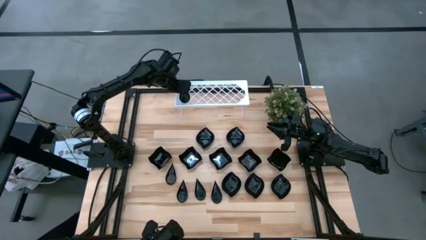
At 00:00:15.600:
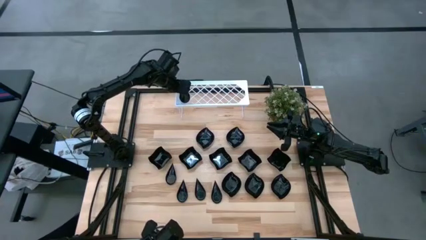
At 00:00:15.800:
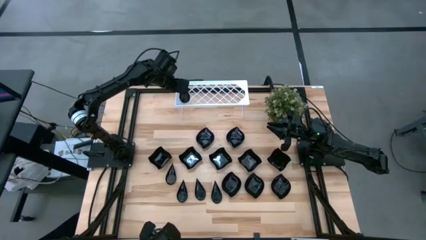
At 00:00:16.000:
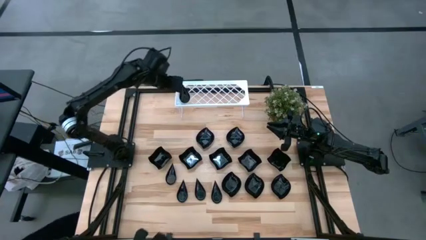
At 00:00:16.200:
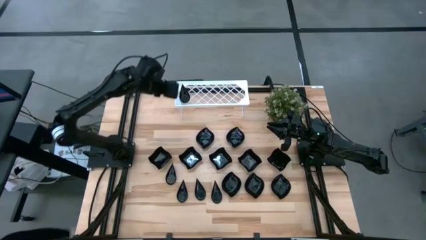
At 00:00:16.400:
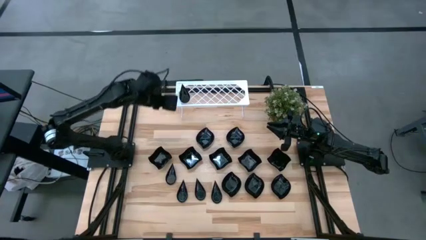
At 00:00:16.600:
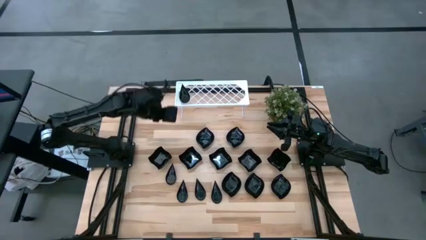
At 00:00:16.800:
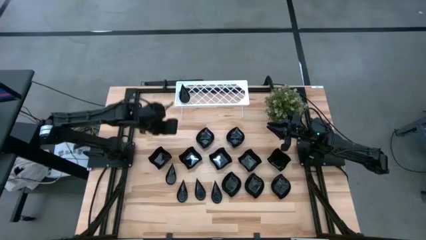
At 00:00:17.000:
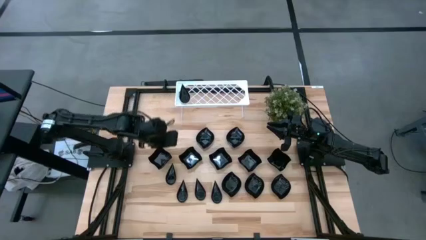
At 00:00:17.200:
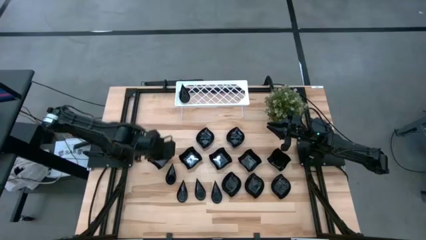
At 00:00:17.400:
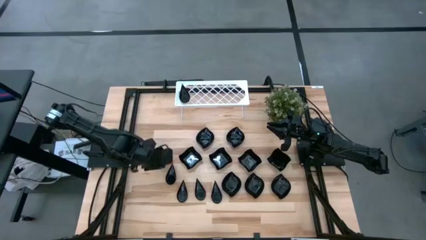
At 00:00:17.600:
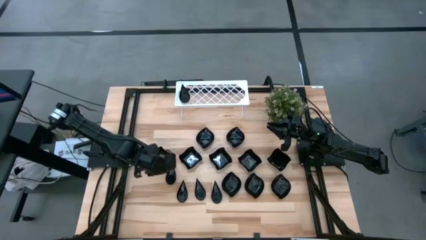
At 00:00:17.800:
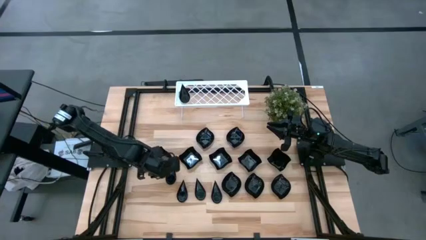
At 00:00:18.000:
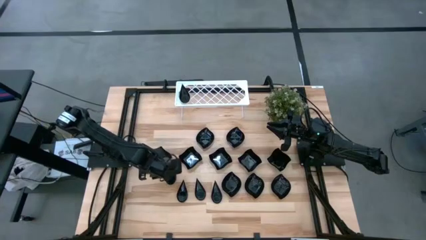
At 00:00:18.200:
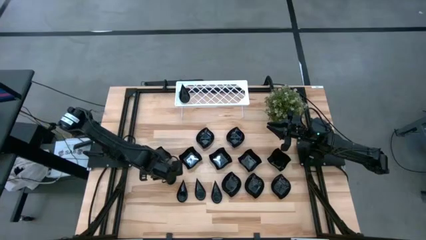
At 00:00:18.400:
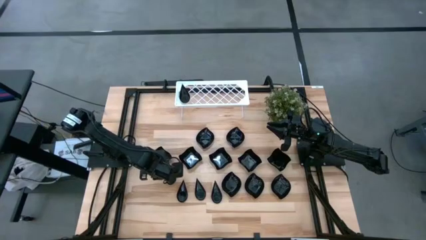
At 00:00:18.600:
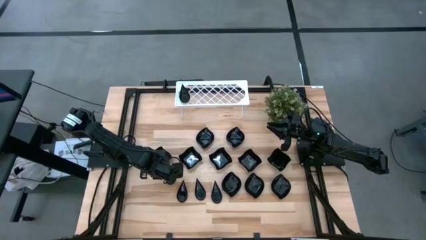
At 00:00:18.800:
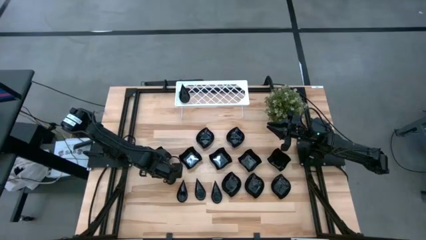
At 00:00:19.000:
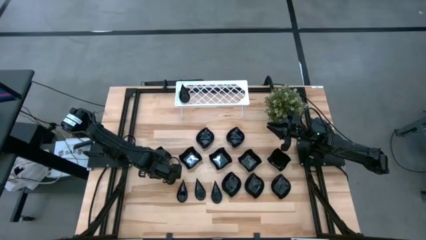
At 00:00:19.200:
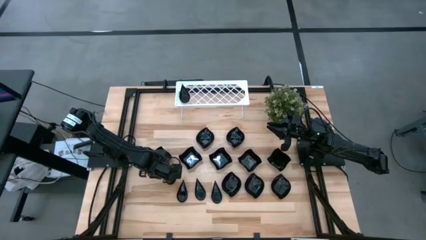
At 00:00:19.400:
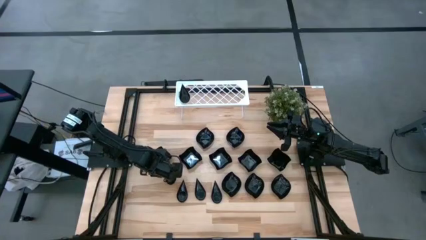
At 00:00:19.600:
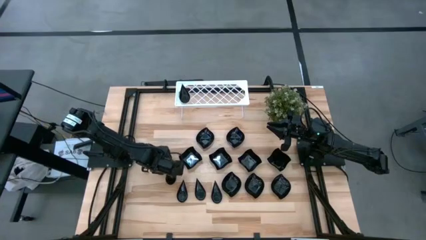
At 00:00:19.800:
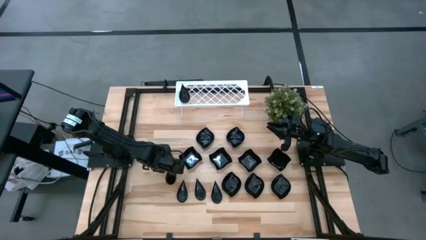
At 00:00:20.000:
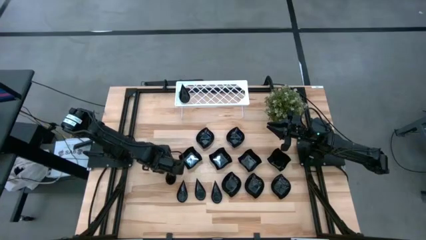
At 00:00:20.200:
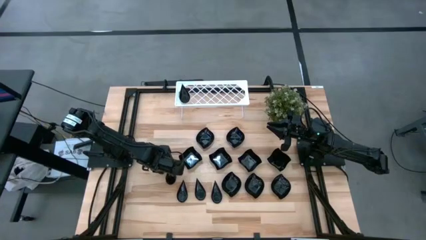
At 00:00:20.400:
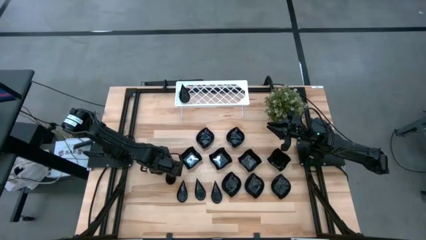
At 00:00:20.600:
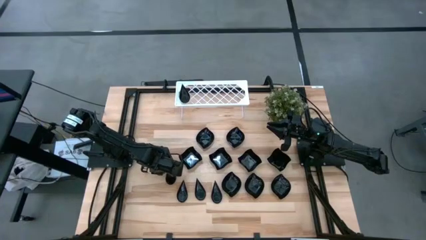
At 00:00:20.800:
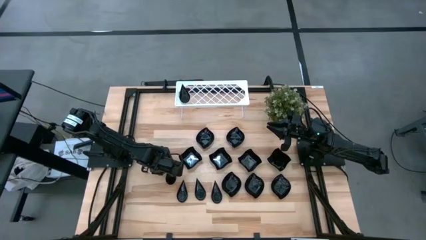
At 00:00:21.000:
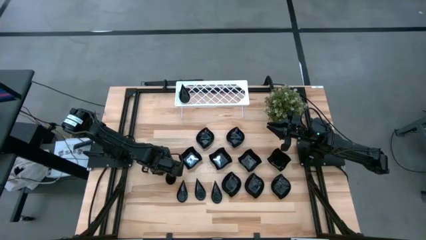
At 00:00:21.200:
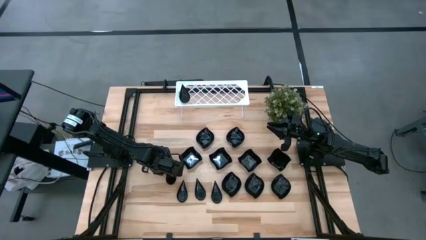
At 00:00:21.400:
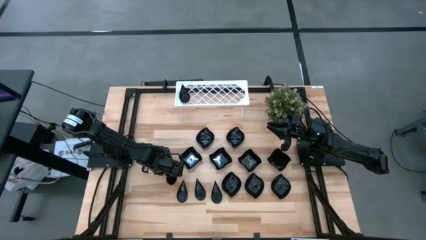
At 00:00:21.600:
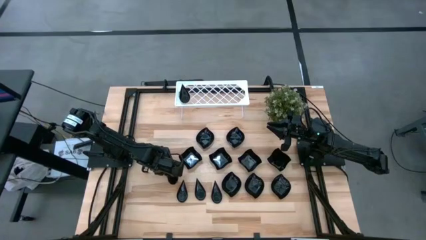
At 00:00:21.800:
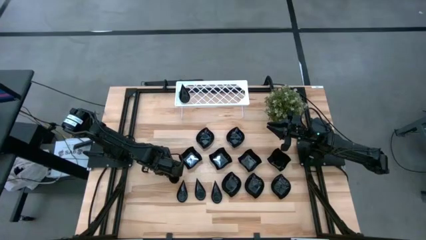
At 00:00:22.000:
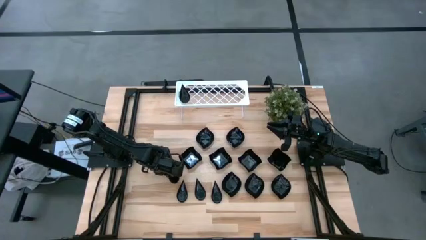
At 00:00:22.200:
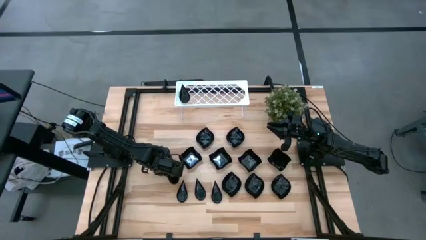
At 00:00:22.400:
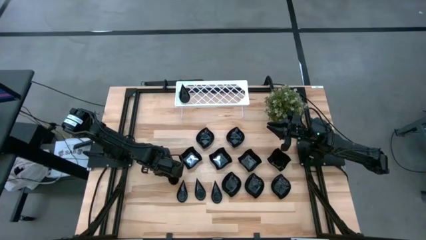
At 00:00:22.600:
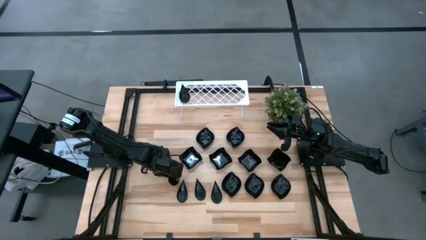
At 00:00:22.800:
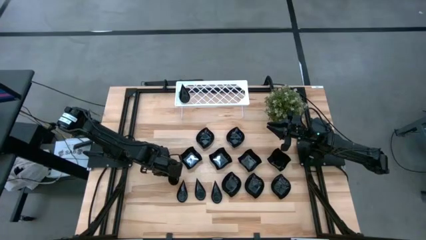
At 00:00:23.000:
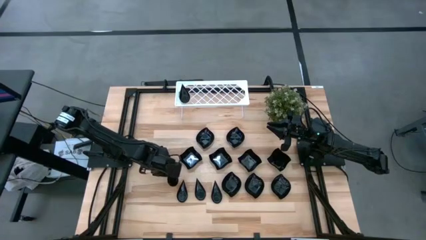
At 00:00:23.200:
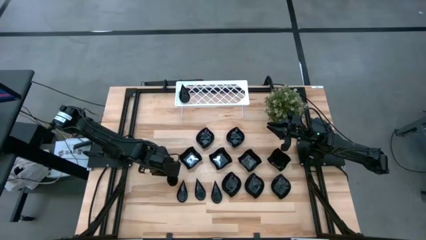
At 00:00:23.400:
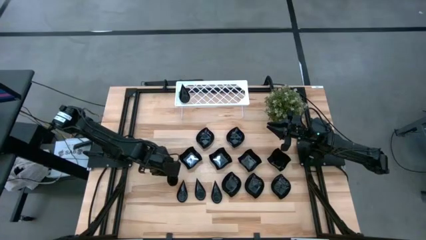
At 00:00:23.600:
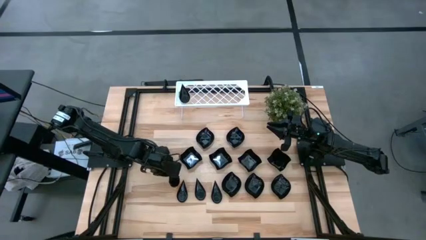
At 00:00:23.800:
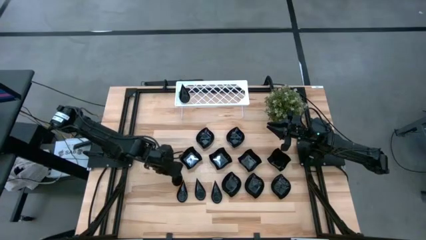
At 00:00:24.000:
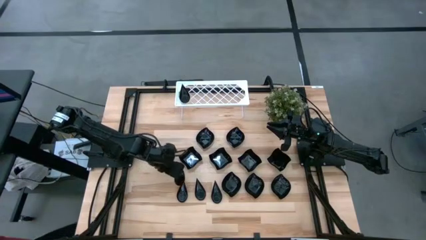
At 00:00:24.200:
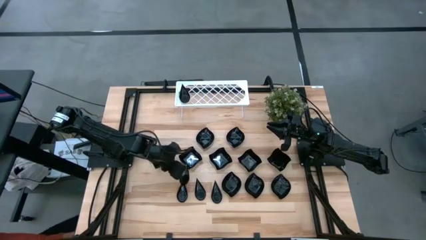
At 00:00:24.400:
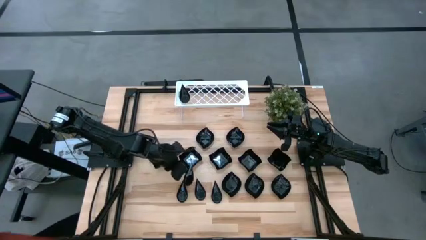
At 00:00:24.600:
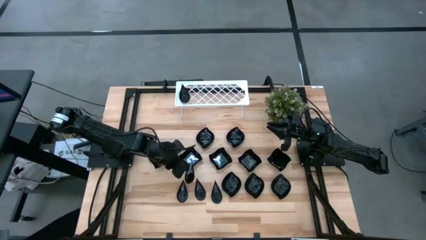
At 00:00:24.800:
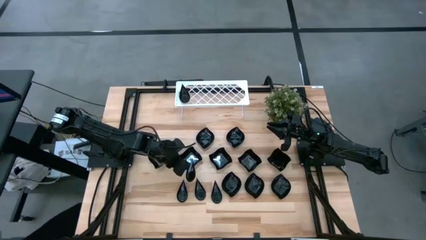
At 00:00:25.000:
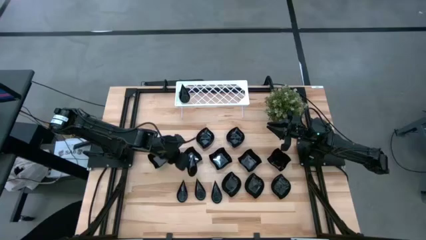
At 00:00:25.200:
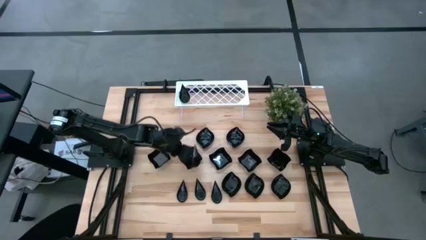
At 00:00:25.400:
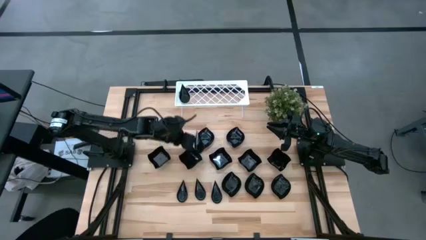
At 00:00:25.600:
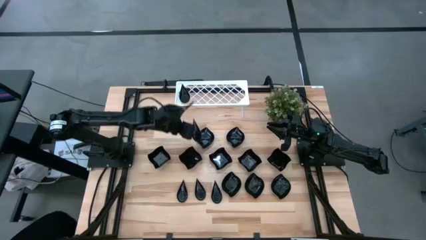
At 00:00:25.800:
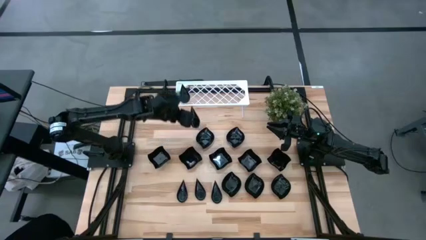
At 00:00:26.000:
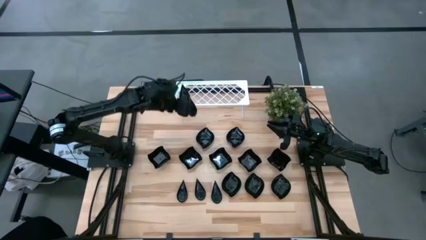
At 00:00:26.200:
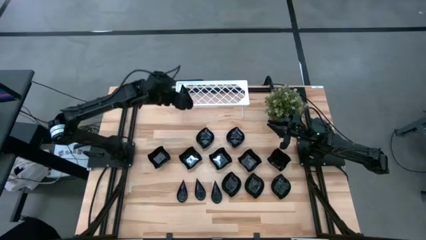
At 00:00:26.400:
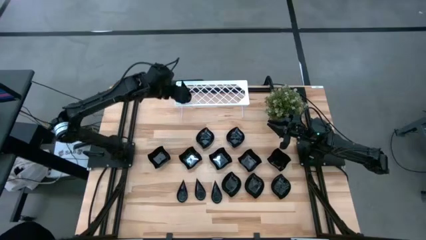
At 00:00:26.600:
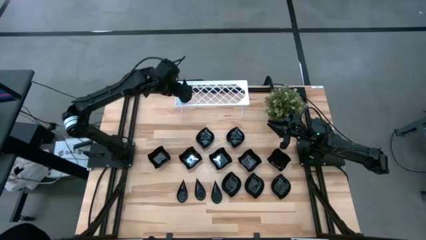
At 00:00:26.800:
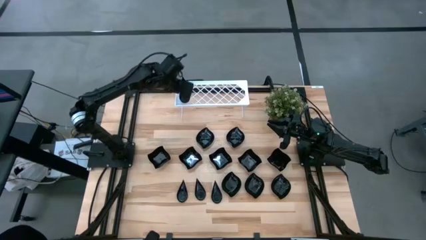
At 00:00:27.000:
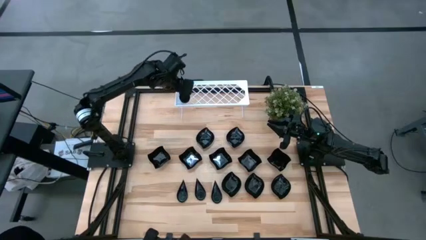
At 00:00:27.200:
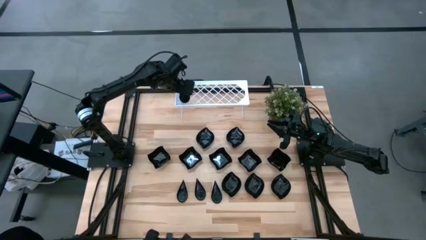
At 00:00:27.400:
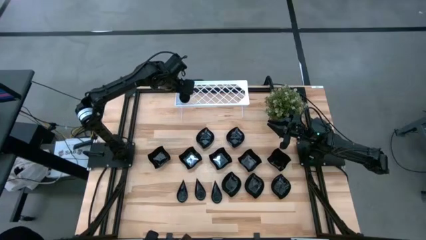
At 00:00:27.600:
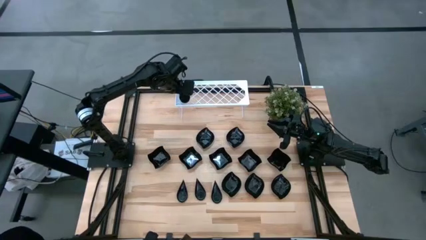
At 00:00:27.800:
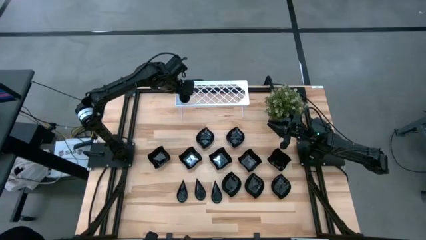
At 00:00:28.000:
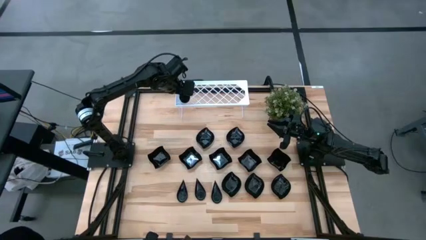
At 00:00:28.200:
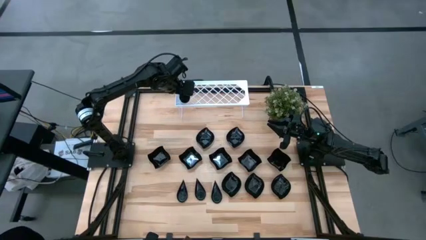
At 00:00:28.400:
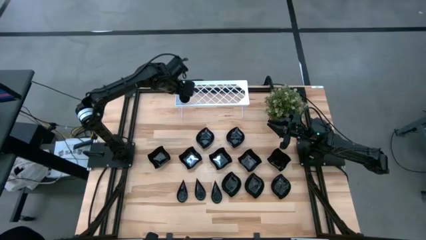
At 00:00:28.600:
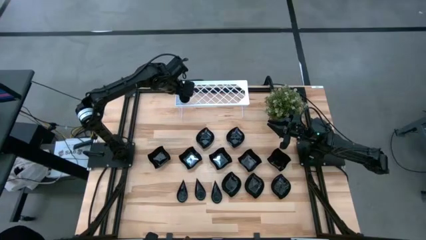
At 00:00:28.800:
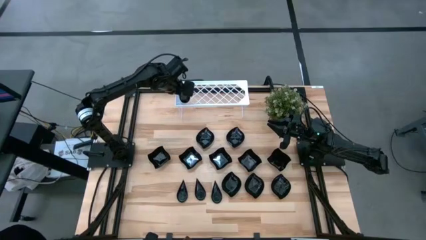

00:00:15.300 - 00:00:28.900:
Task: Pick & Place Mini shaped plates
Stack the drop-shaped plate on top of the drop-shaped plate on the shelf
